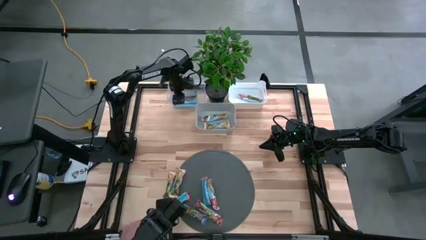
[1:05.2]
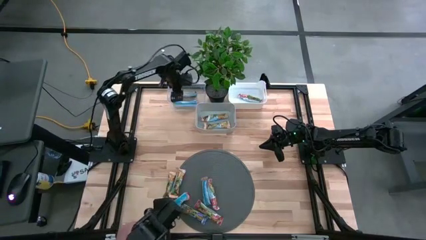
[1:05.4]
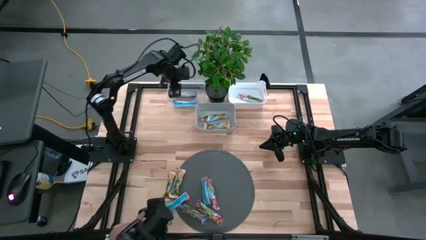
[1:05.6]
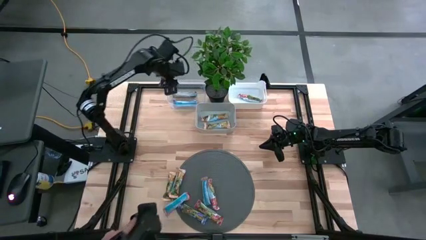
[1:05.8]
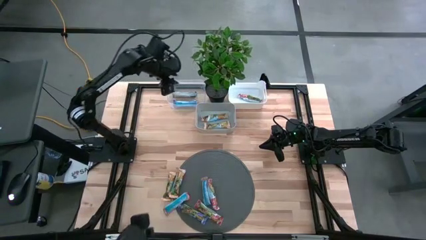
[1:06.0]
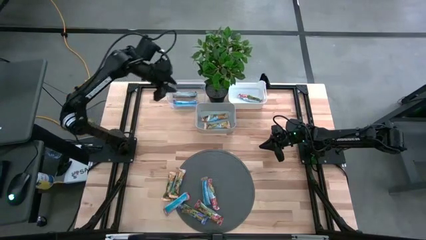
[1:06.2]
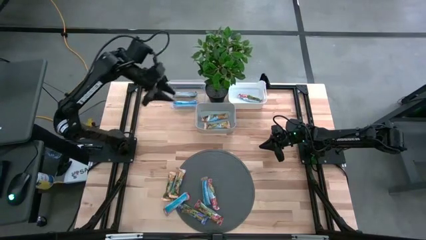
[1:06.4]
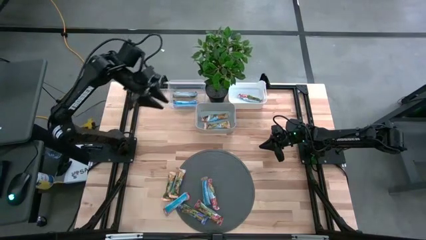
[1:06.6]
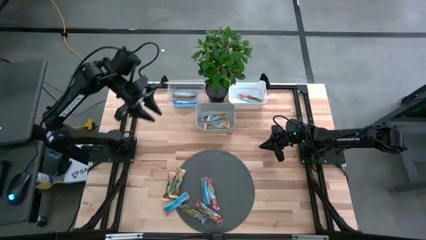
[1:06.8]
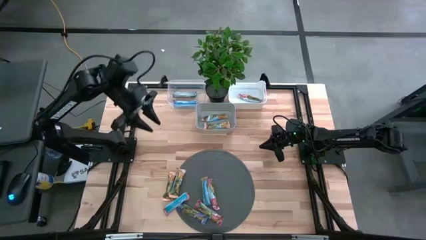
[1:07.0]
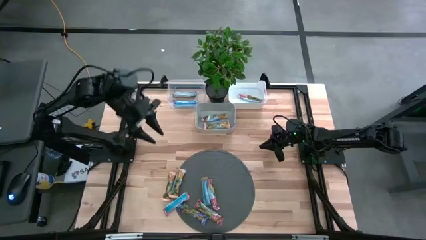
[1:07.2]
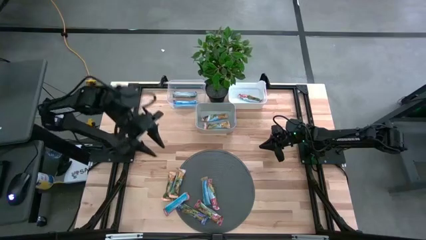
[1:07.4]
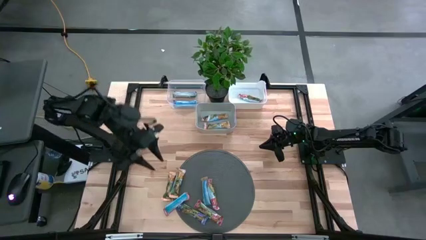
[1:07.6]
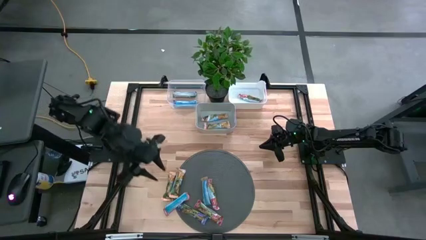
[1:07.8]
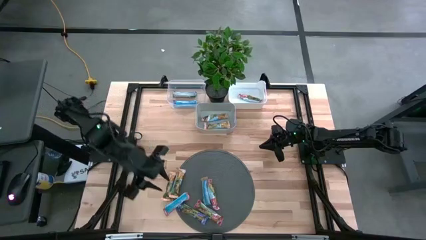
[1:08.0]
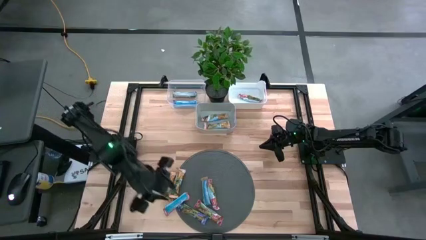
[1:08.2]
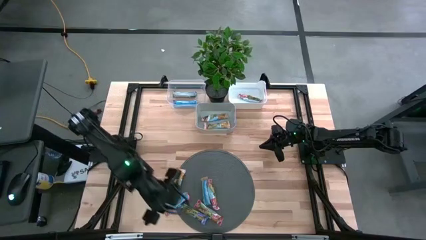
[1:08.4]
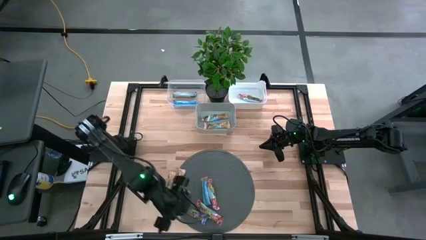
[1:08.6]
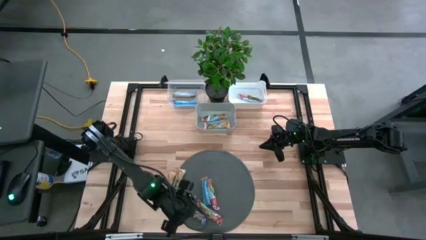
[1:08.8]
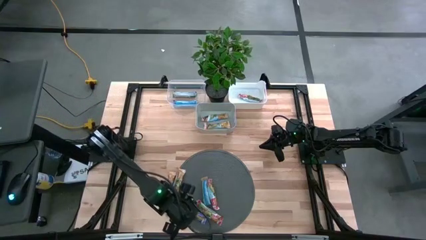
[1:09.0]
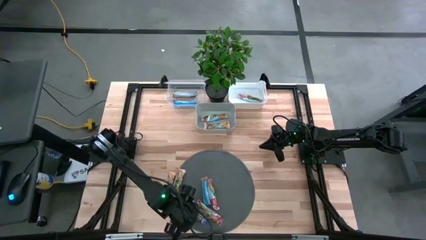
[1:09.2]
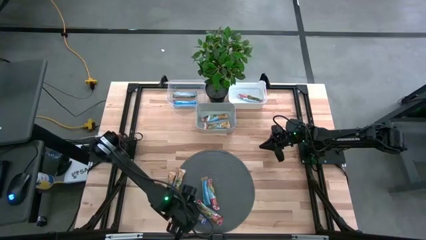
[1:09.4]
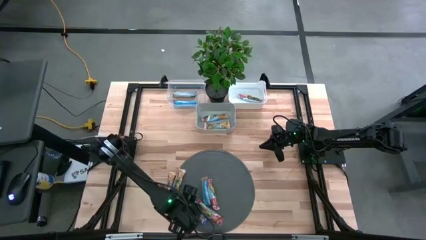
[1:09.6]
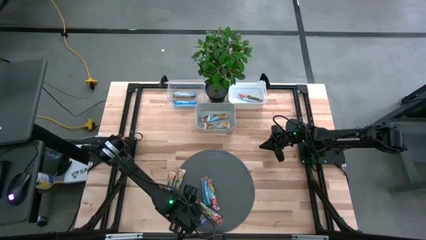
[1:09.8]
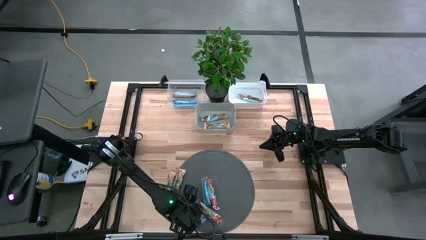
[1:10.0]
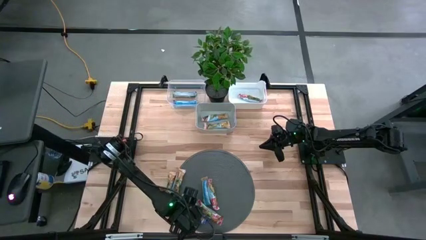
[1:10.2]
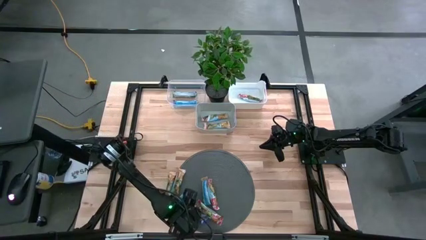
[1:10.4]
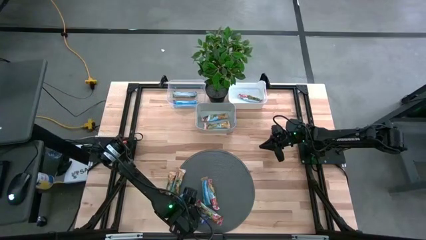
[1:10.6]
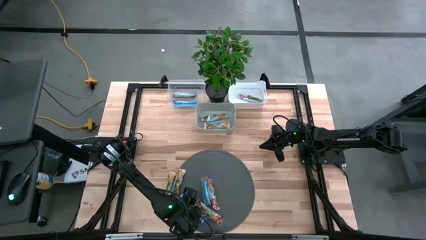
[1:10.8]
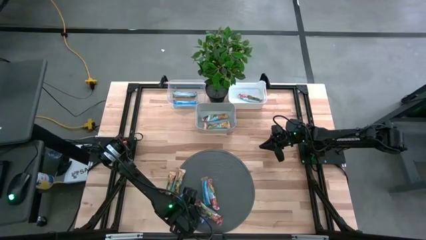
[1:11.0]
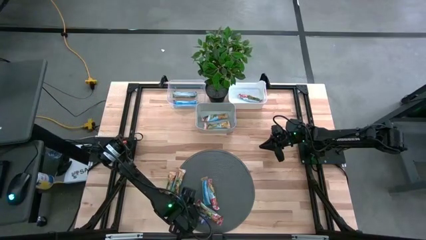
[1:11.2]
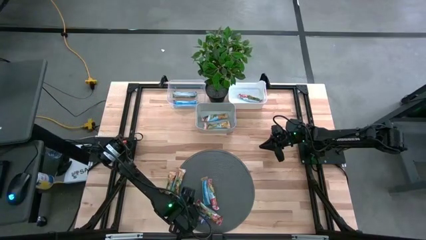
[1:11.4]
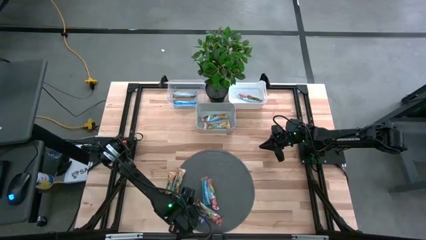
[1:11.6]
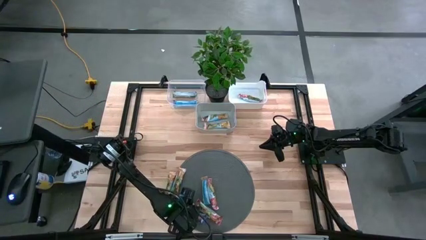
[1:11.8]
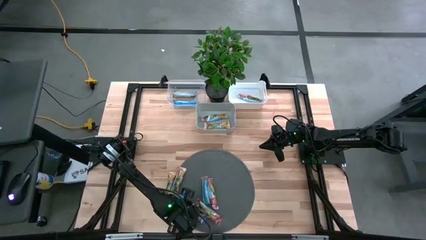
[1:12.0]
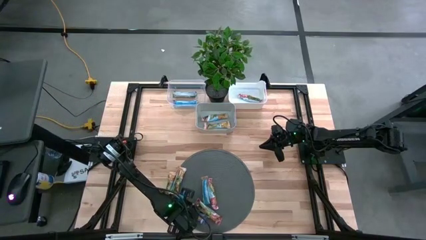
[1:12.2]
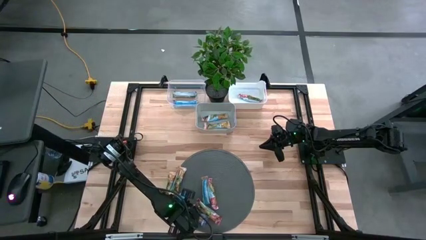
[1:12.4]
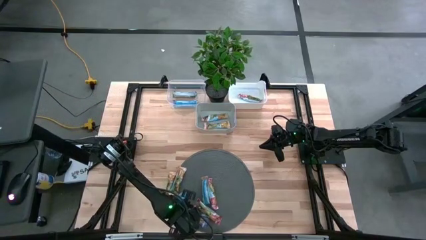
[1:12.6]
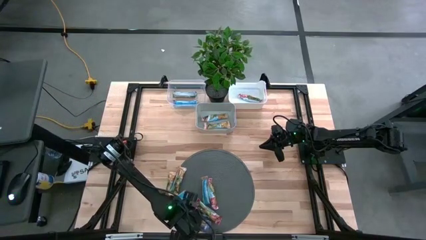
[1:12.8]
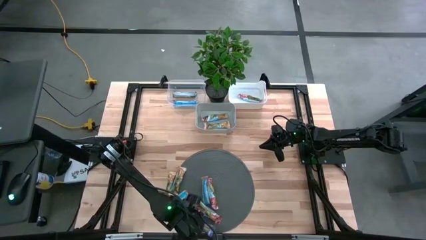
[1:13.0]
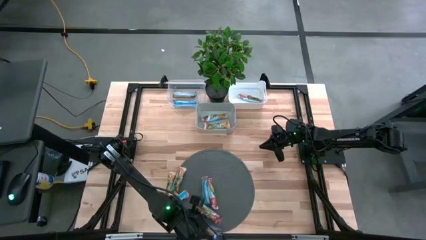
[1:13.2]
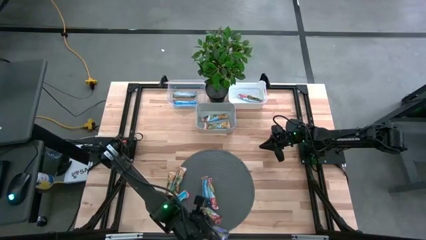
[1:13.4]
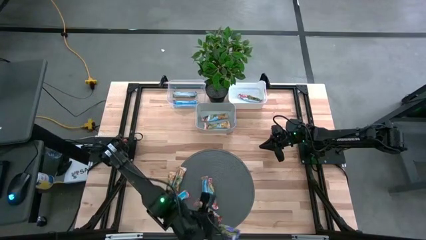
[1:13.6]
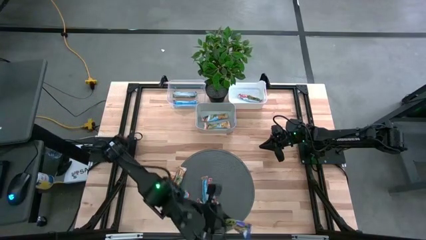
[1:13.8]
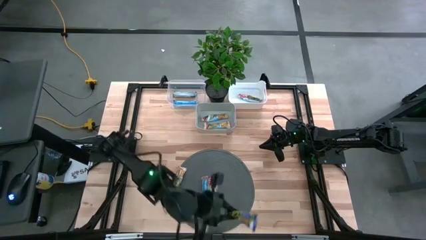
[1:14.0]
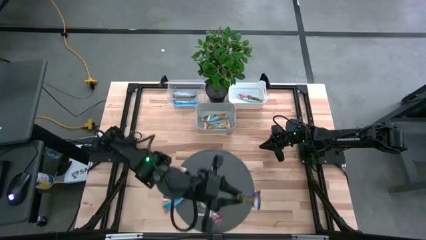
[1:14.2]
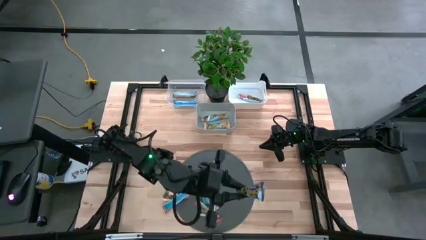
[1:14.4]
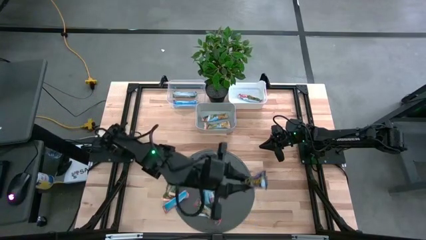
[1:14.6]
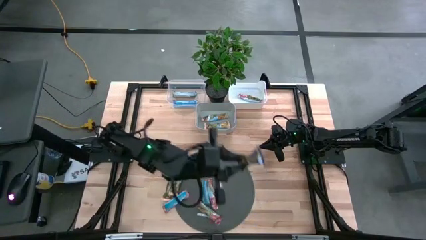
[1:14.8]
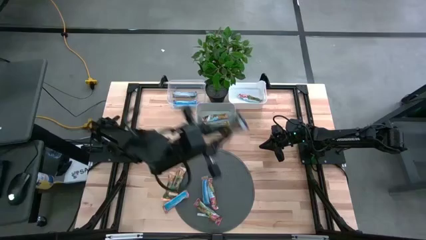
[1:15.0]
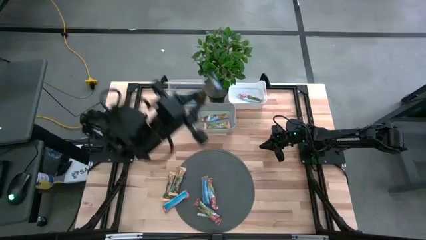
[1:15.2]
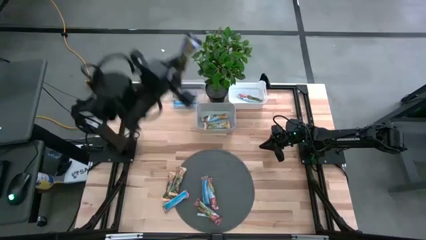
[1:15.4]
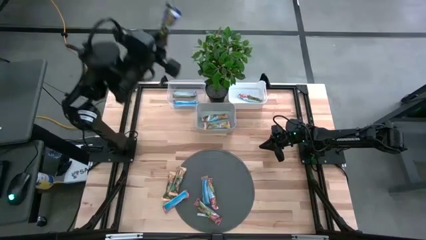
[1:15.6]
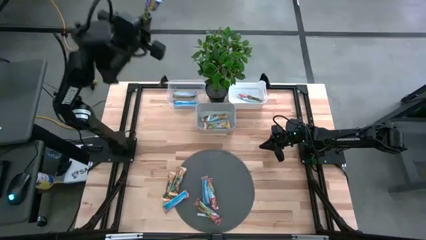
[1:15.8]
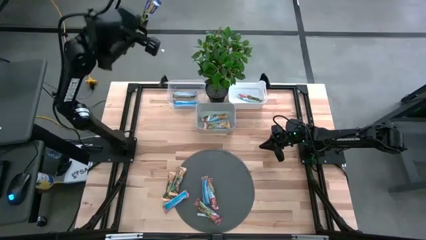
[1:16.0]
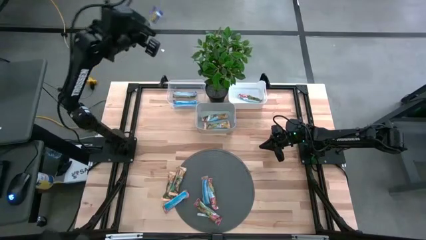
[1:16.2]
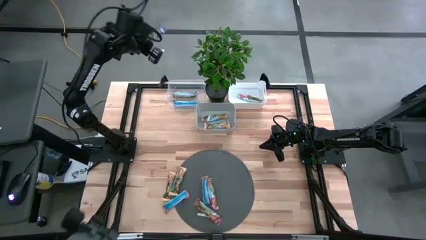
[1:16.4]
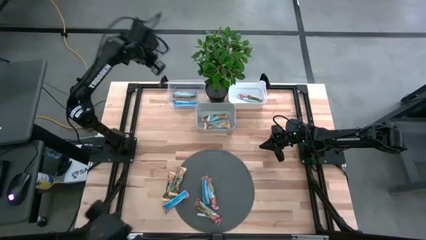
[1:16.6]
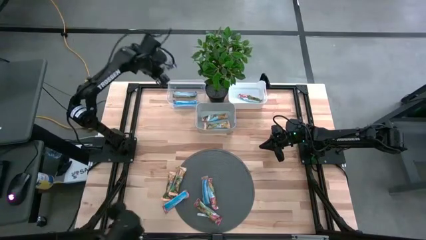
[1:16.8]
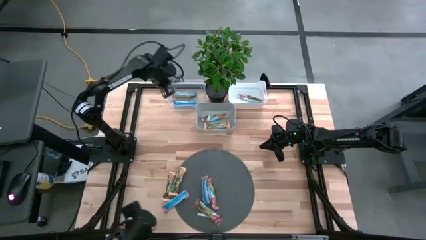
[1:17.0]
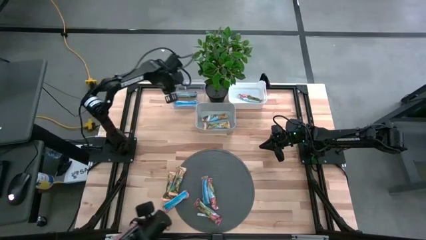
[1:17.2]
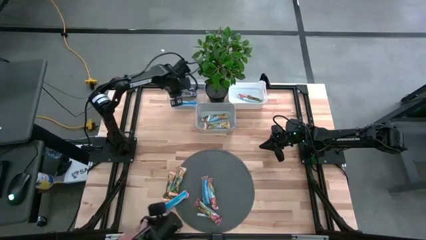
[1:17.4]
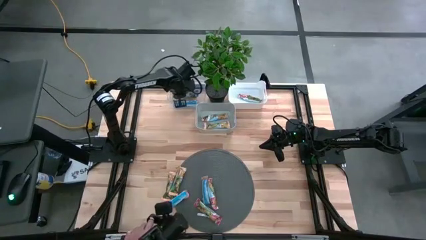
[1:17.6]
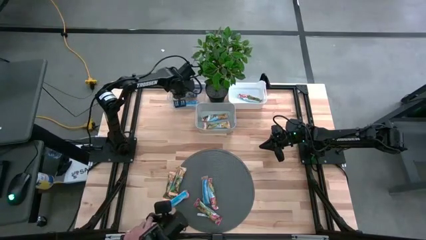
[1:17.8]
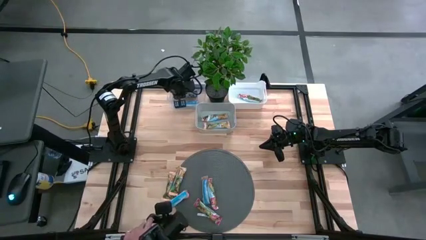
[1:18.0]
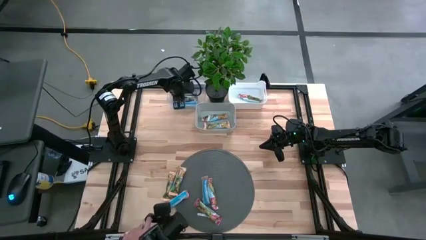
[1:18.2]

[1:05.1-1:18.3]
Task: Pick and place Granola Bars by type
Put the blue granola bar into the transparent bin
